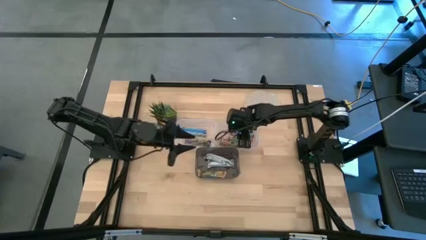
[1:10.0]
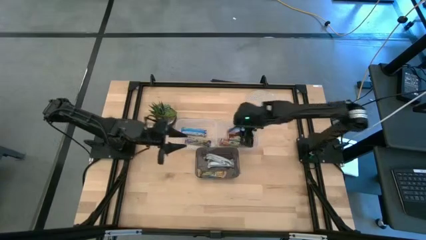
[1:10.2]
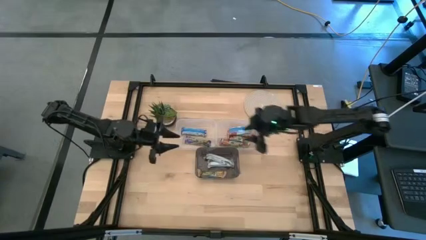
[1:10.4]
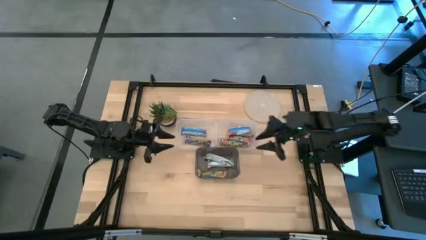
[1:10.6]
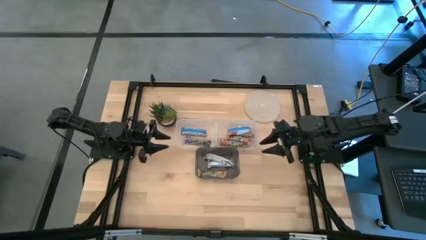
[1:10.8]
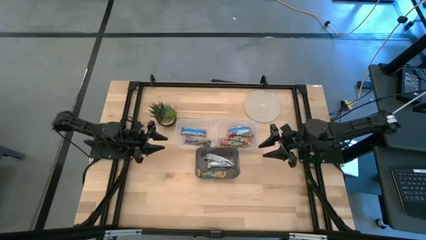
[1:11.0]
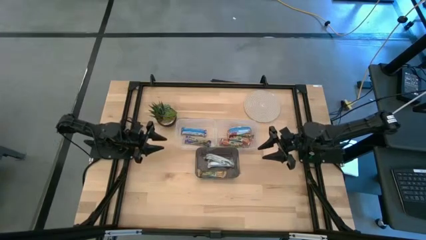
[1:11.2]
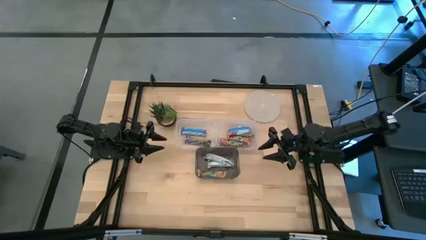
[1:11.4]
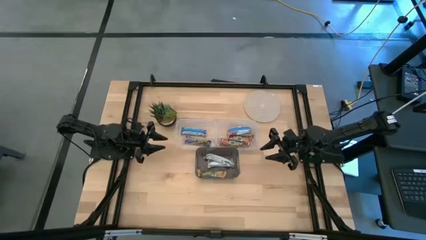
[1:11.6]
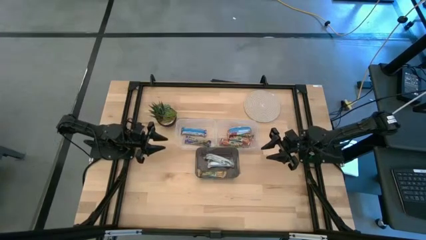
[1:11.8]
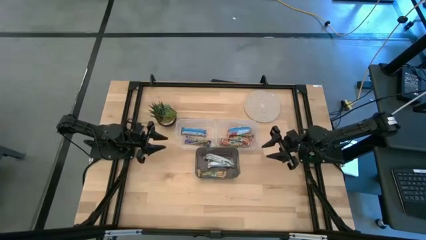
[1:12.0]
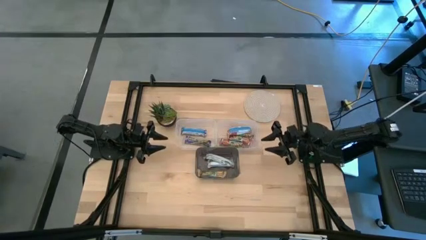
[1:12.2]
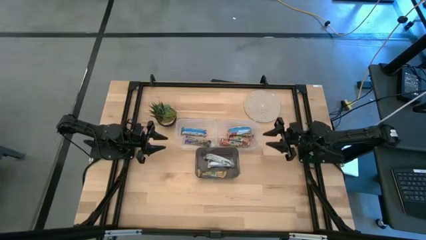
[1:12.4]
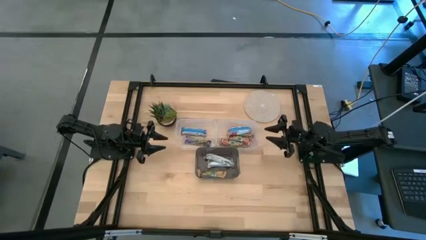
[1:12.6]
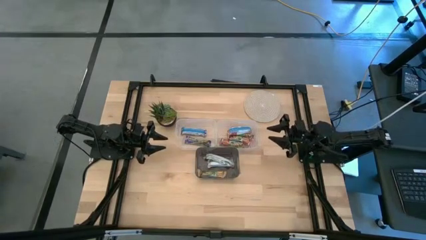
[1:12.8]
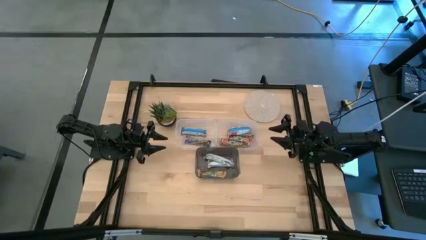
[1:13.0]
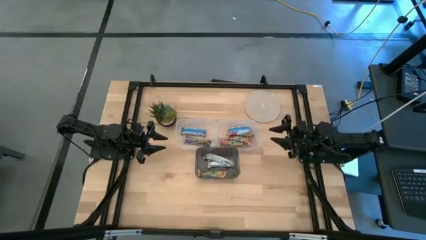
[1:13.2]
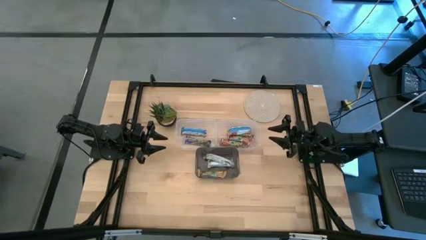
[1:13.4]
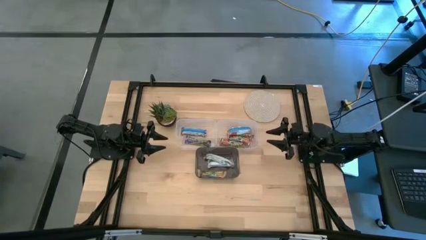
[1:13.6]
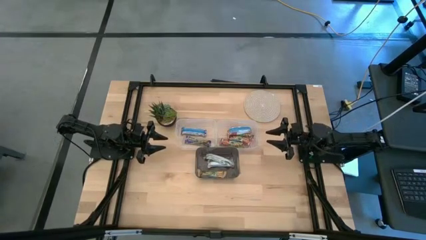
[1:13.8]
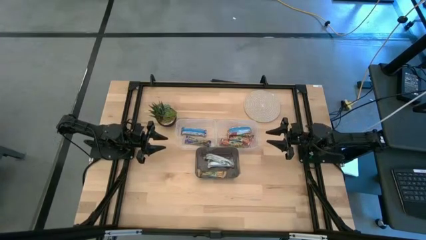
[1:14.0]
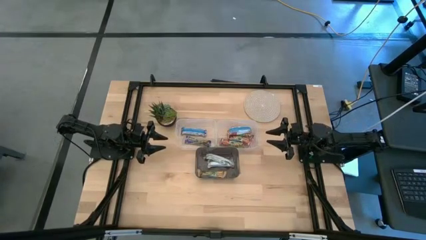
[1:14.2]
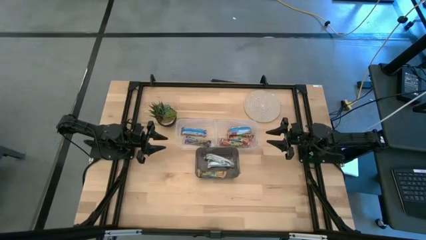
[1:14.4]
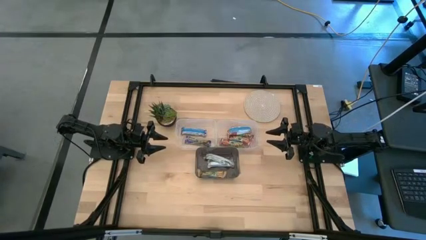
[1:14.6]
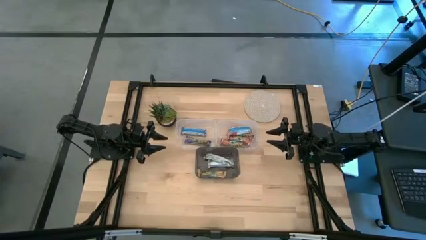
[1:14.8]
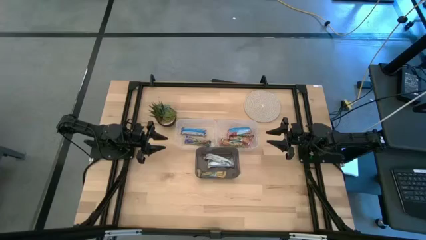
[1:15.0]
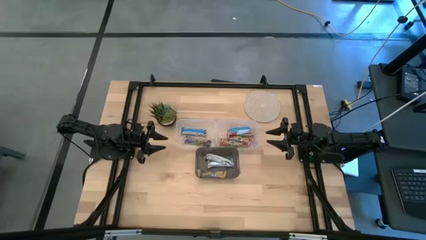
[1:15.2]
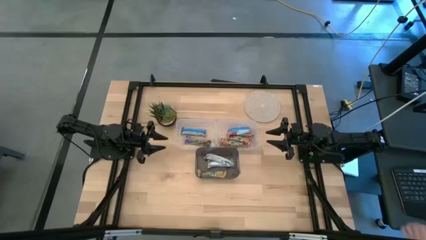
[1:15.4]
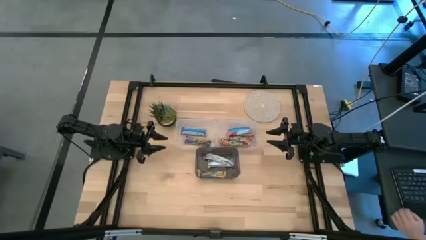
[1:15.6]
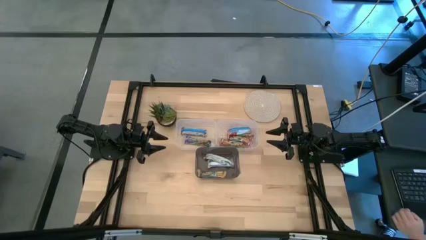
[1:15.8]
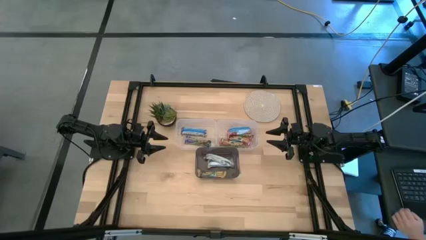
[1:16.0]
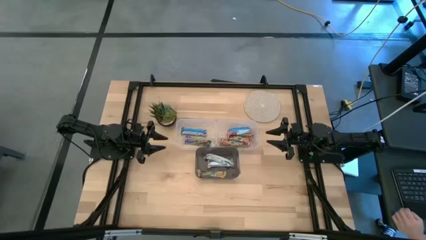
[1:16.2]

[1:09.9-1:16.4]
Task: Pick and place Granola Bars by type
Return to Home Position

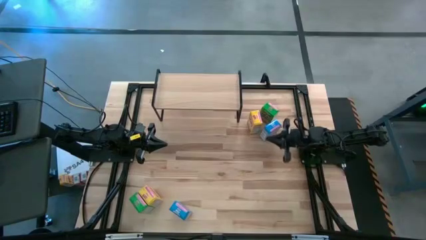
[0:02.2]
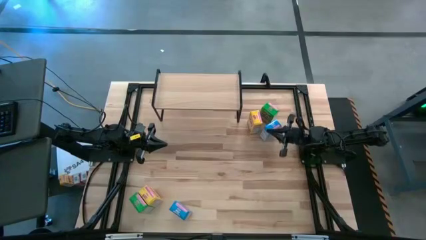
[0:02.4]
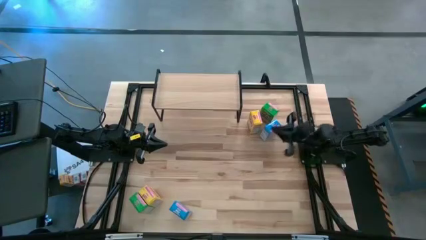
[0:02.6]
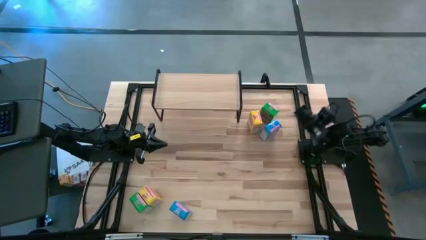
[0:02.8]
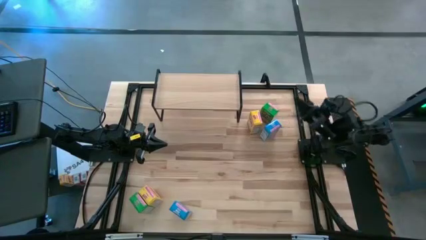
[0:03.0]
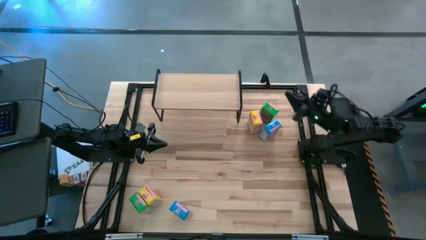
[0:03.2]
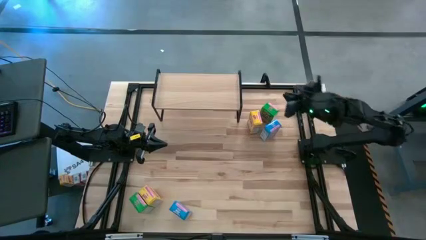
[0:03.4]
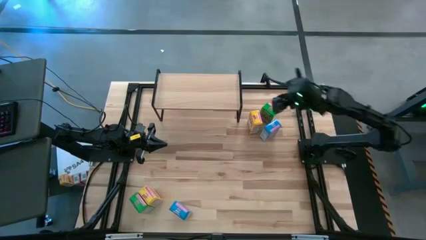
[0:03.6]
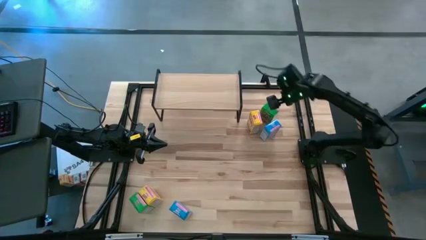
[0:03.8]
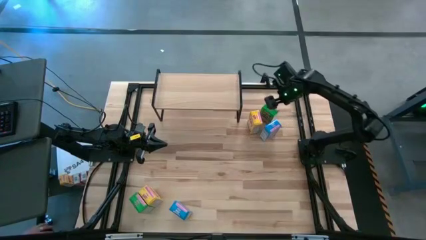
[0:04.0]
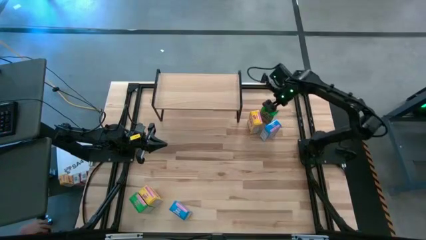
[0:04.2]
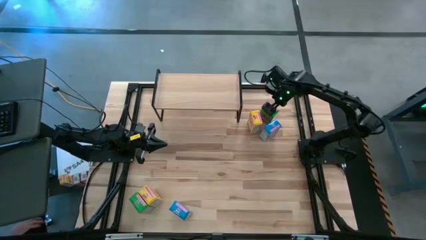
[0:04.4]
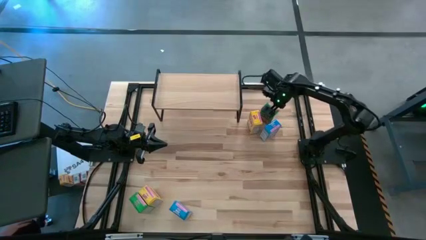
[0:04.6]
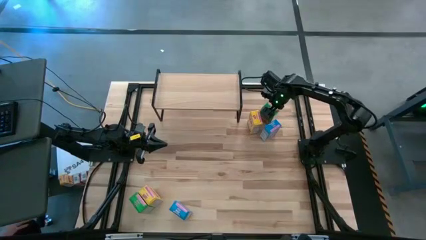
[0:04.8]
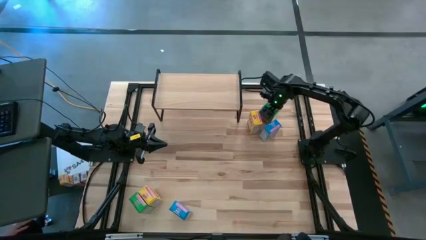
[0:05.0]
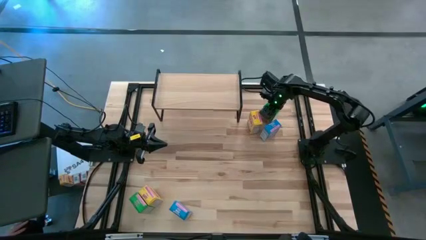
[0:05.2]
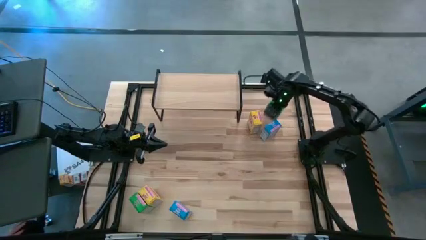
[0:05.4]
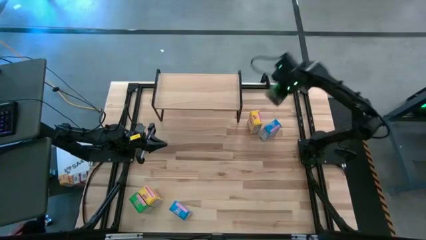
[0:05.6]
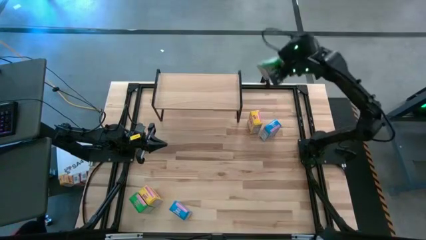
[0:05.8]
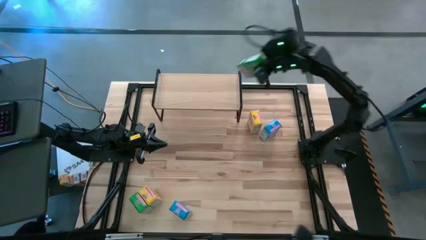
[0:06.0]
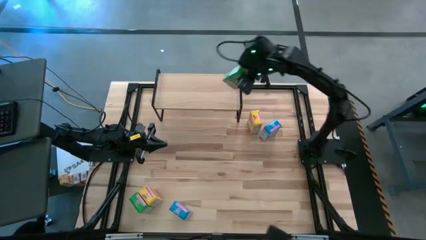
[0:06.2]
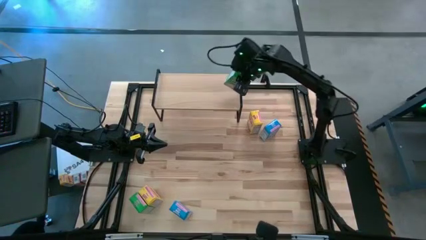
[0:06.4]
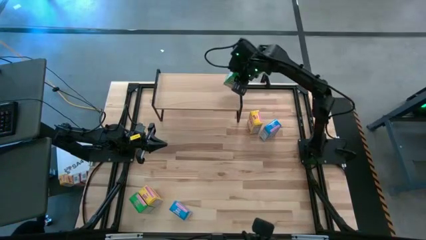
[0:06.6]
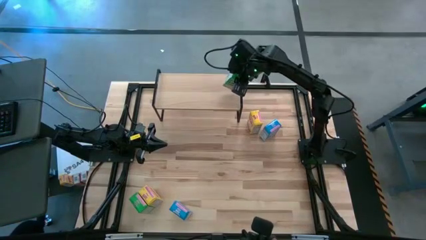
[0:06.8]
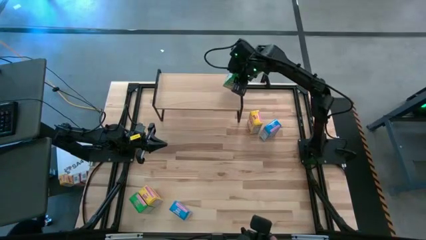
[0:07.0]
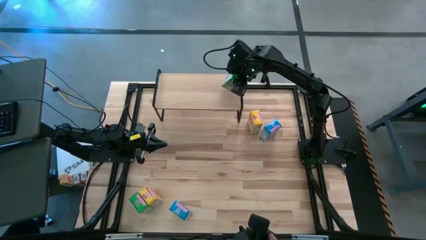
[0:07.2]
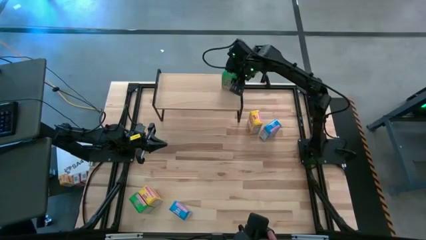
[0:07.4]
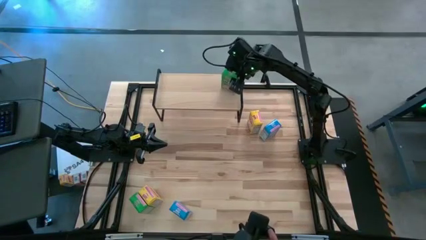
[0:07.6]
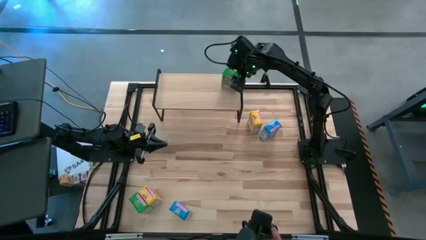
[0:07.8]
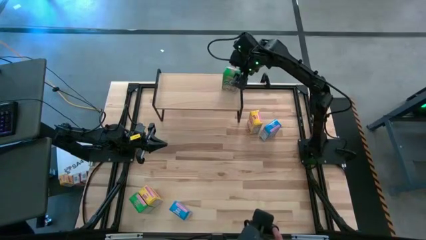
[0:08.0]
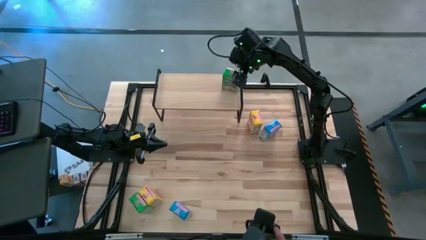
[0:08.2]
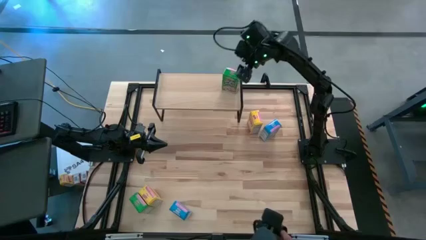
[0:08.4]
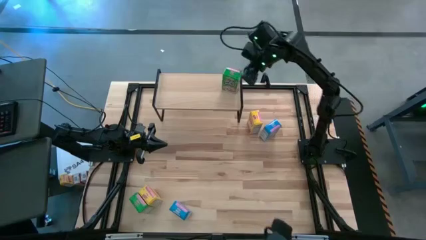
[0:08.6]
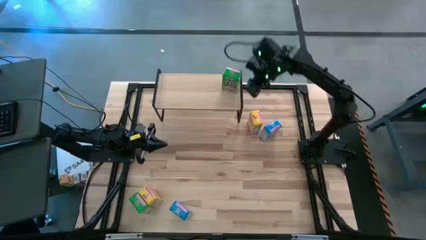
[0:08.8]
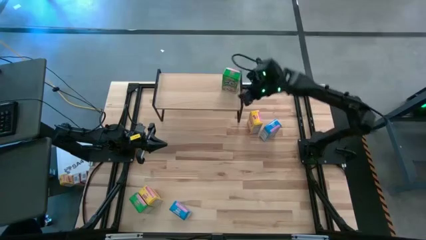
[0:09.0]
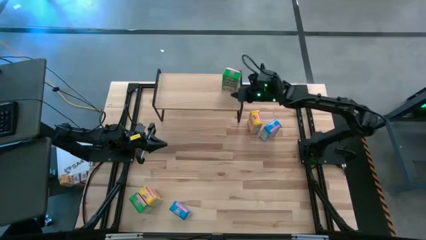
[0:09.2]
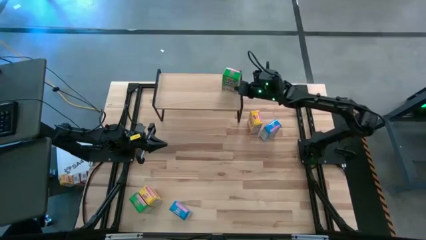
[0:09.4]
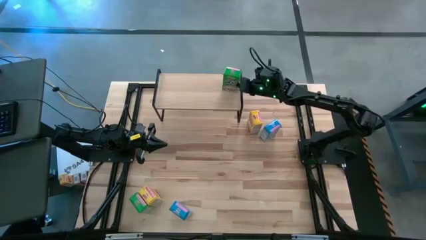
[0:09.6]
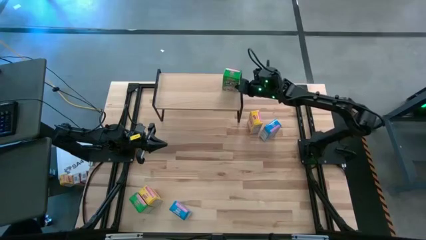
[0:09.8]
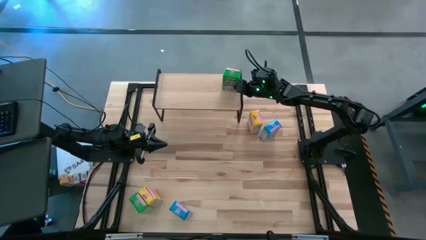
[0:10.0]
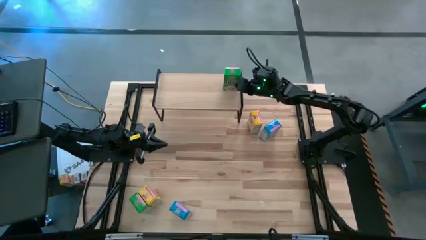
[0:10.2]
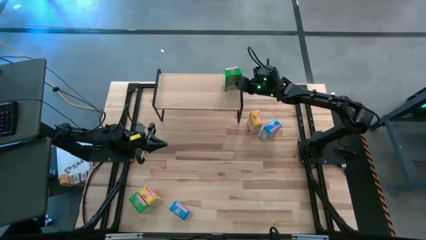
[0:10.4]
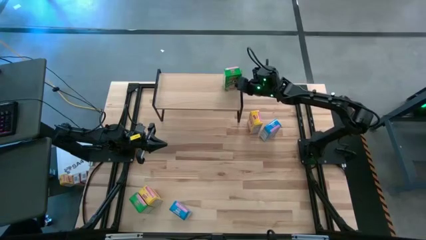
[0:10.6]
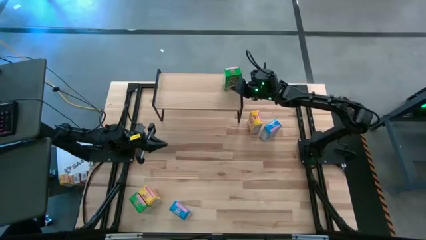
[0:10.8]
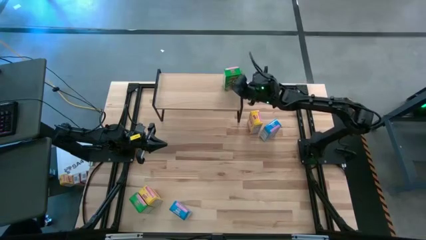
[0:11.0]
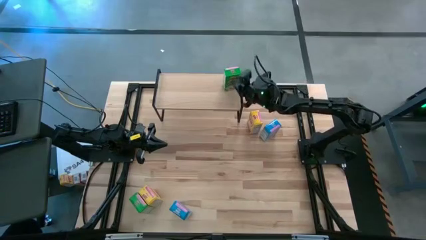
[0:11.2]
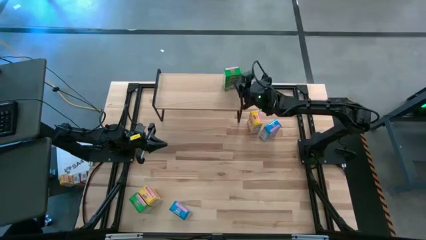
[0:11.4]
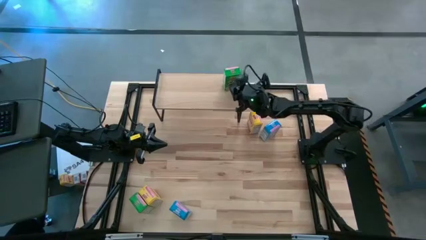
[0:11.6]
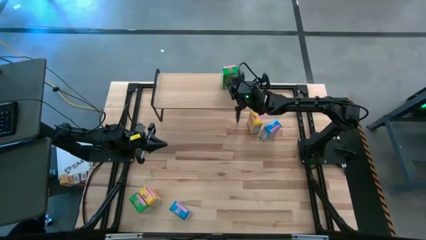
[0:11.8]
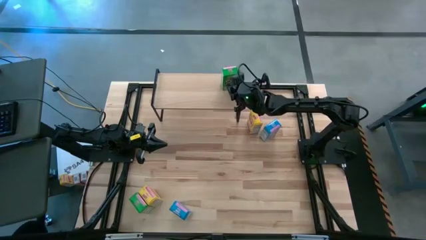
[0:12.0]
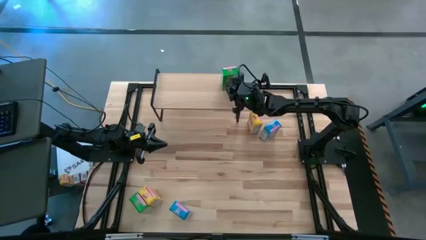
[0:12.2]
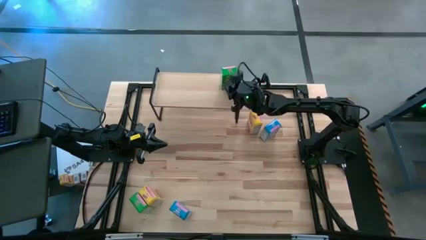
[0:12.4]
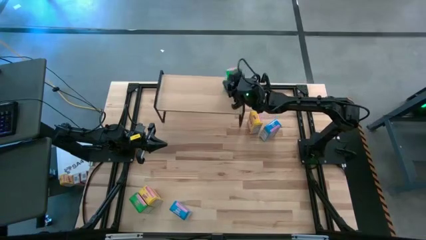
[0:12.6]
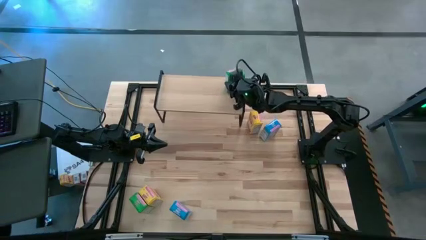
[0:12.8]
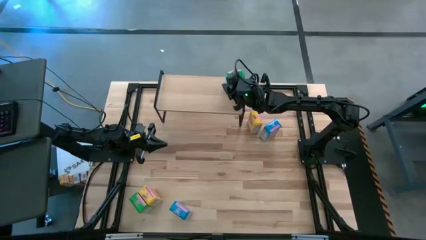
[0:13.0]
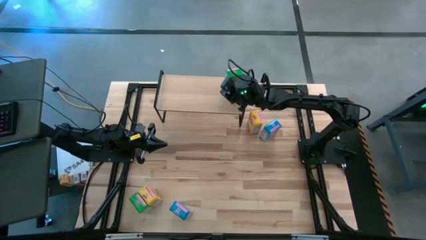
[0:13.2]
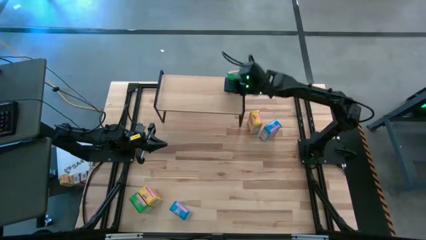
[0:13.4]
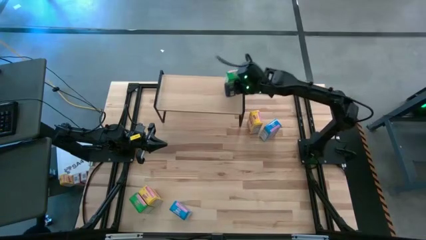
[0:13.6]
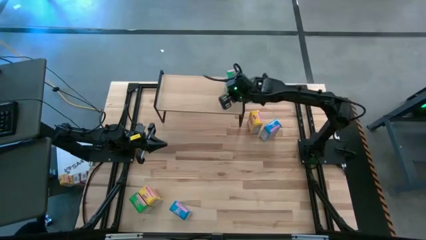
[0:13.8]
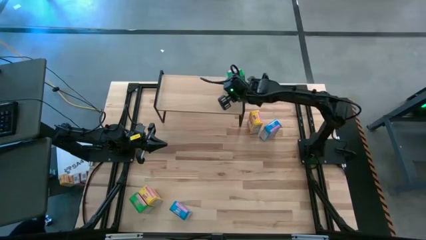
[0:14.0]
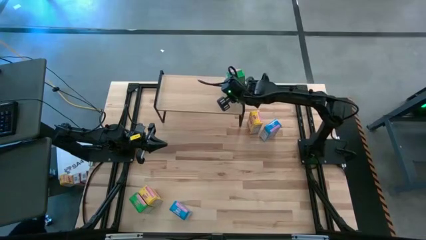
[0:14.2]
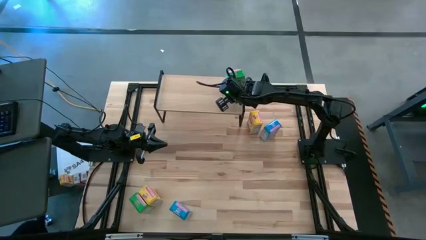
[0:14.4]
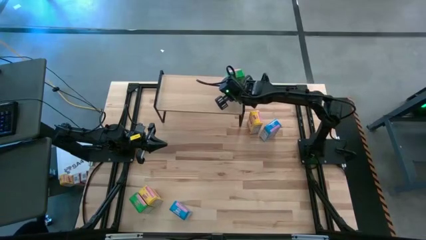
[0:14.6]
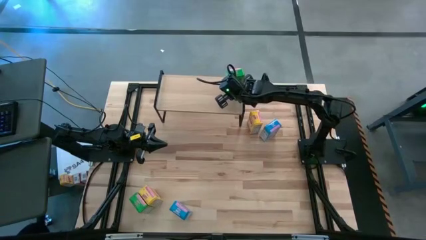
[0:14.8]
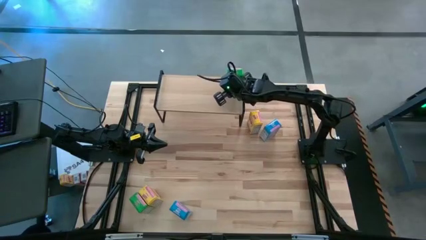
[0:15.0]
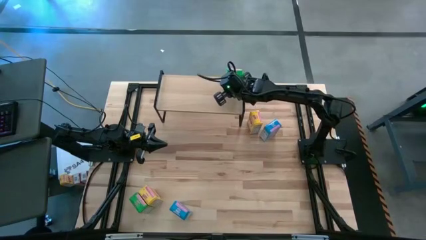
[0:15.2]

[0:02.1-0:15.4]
Task: Stack cereal on shelf
Put the top green cereal box on the shelf
